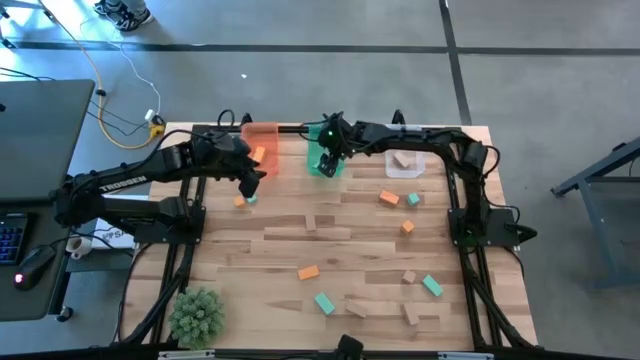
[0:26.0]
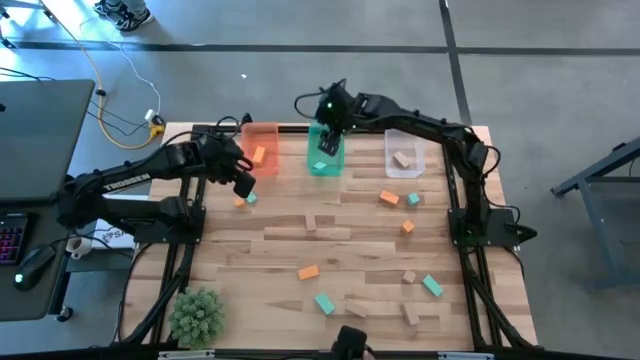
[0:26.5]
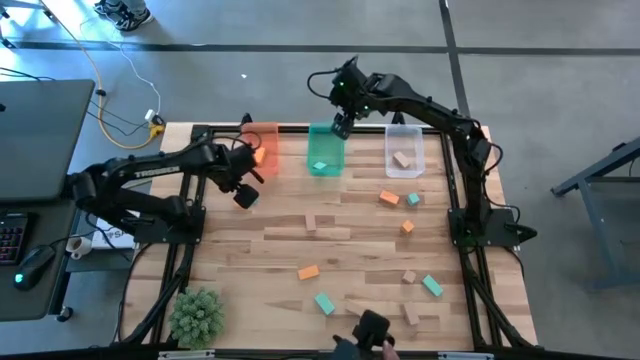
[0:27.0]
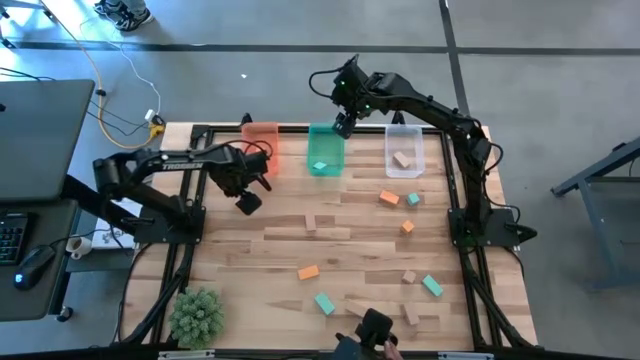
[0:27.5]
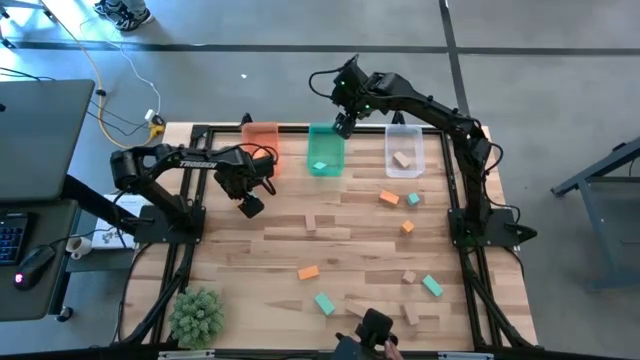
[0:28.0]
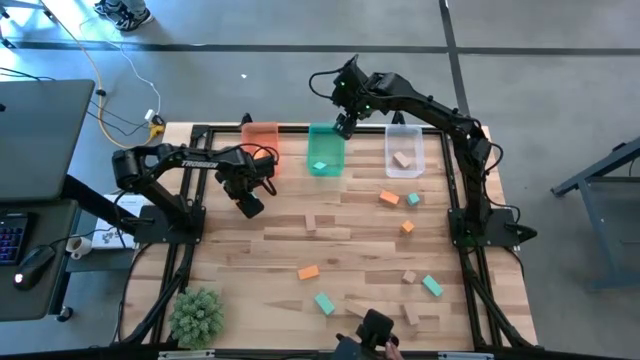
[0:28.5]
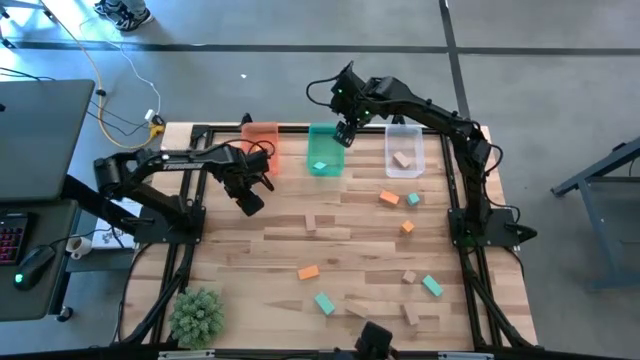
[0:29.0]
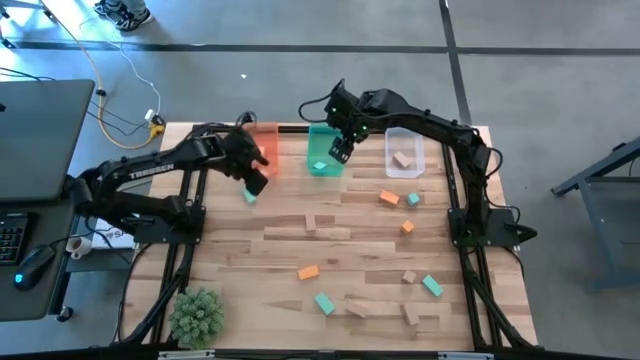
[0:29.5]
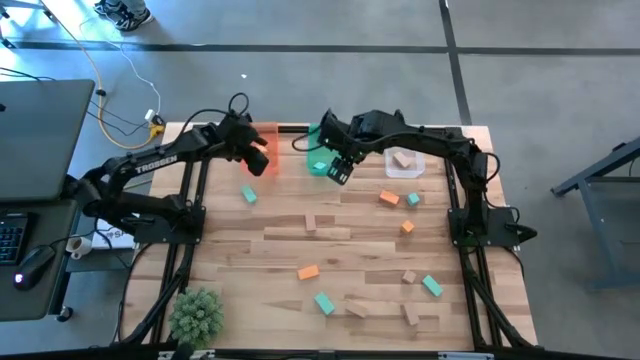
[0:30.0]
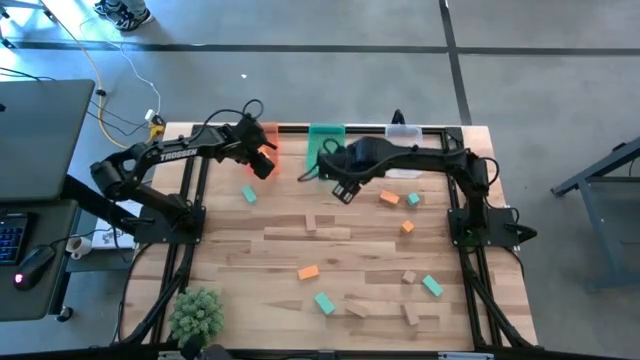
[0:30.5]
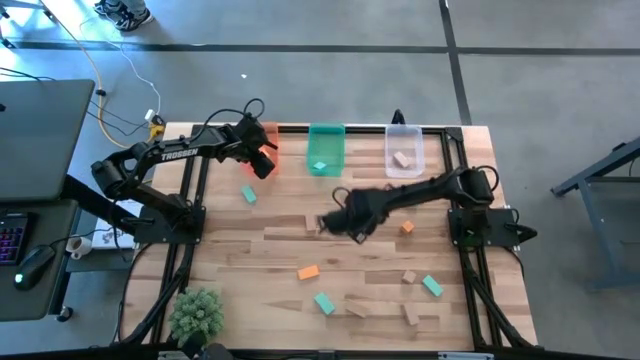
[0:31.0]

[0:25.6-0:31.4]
Task: Sort & place blocks by color
Put the orange block into the orange bin

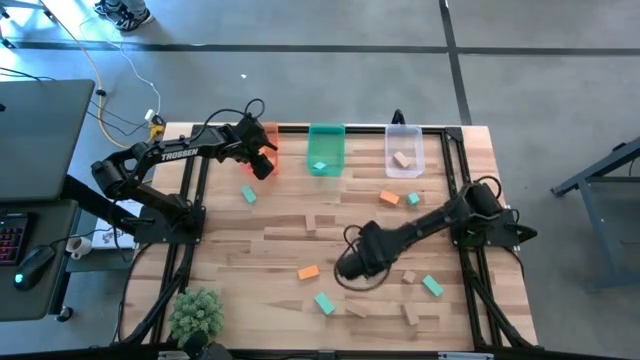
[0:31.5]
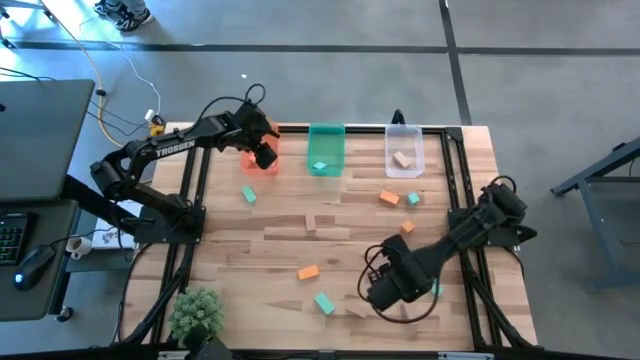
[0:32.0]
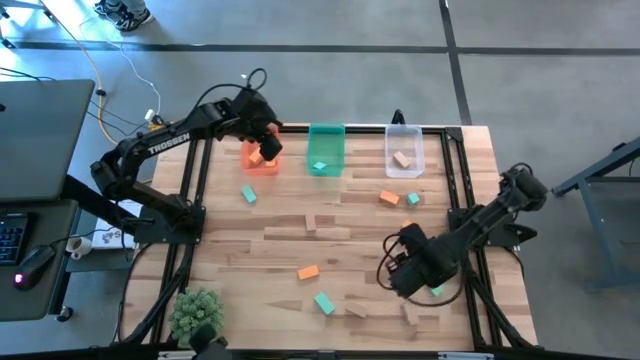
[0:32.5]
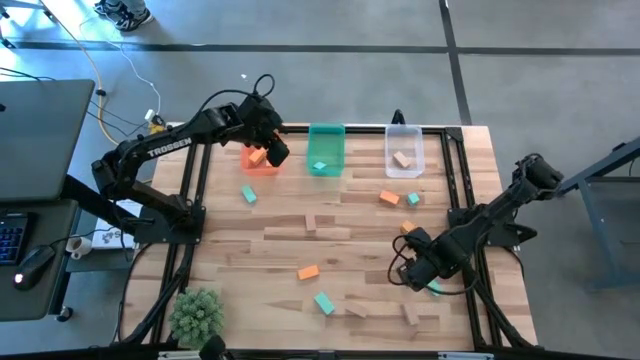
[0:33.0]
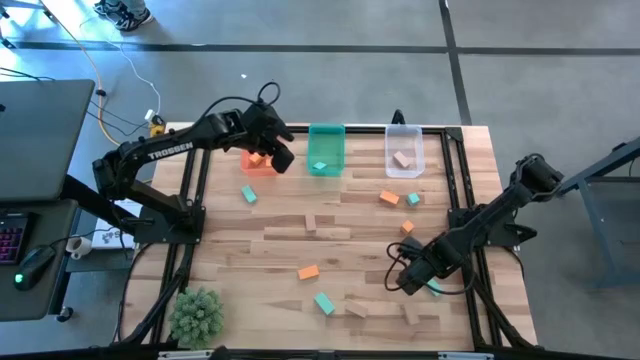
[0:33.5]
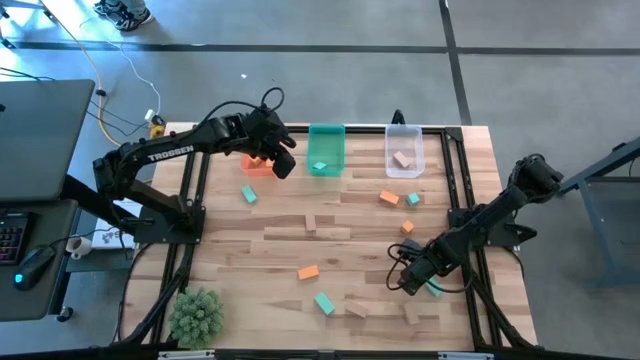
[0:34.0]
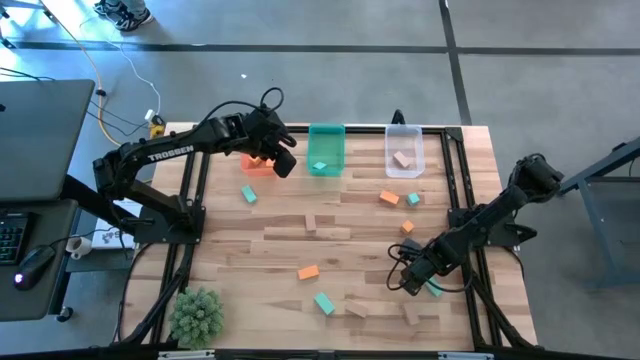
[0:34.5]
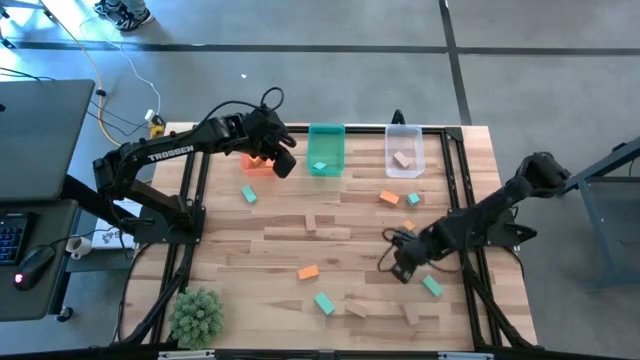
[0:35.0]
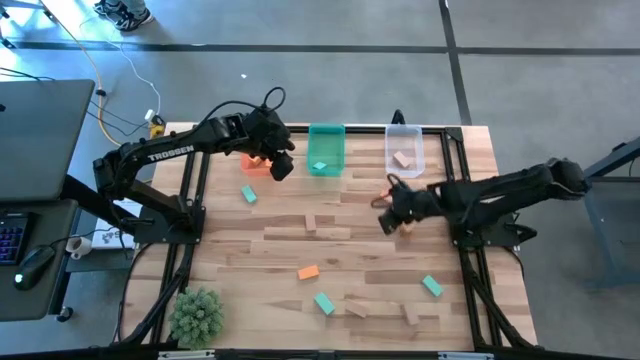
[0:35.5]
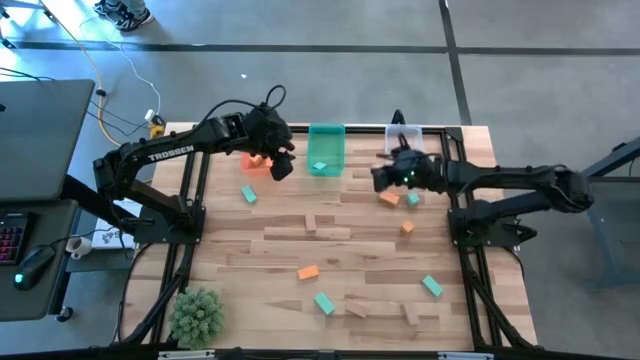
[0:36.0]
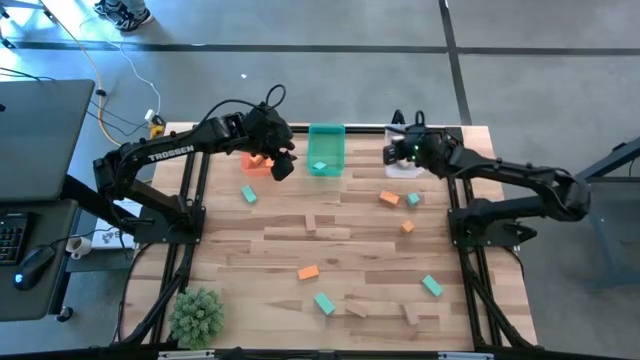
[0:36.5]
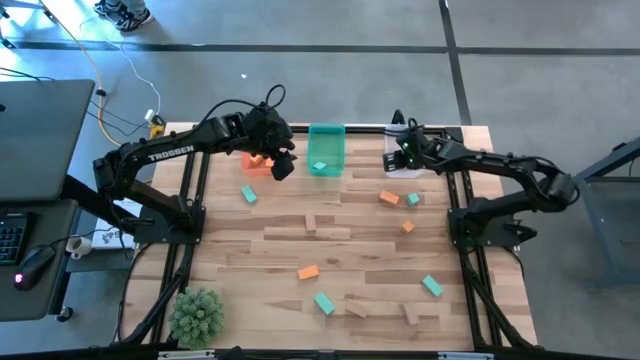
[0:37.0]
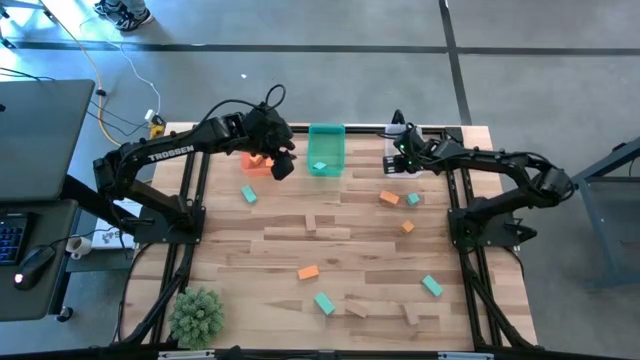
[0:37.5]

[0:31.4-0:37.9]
Put the brown block into the white bin

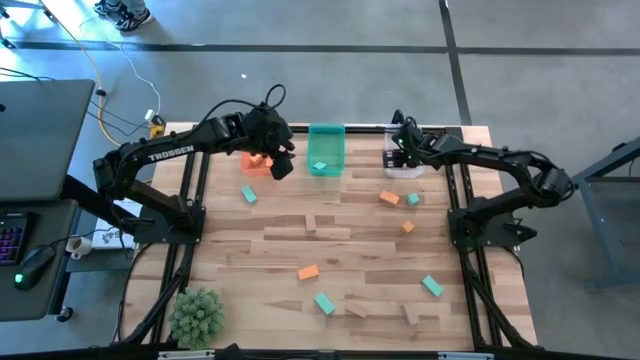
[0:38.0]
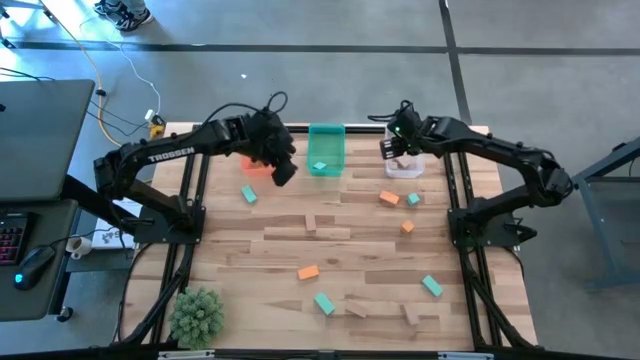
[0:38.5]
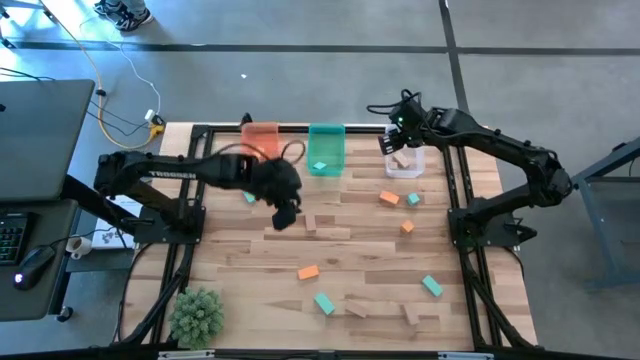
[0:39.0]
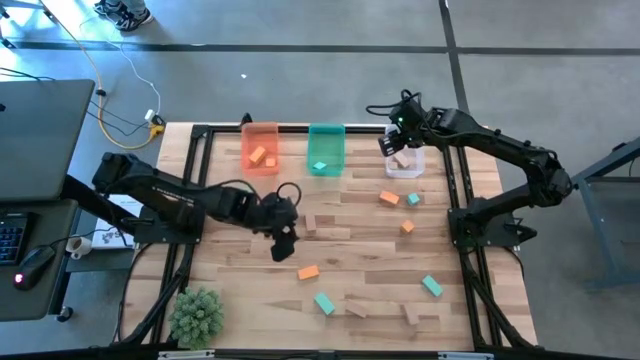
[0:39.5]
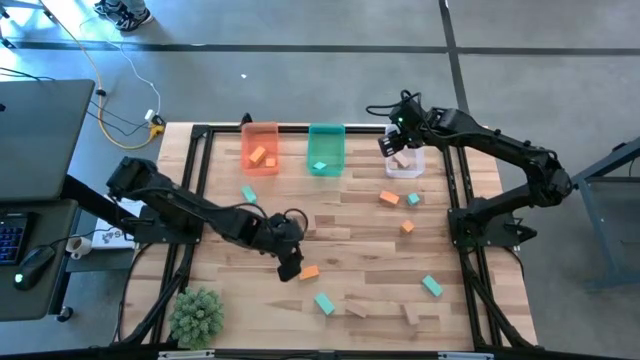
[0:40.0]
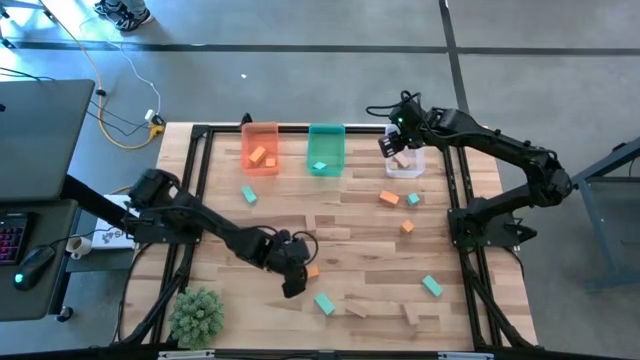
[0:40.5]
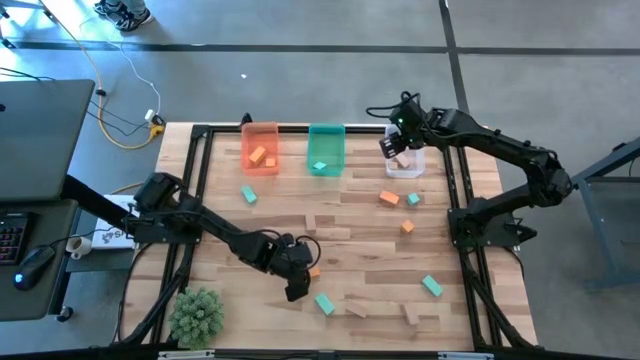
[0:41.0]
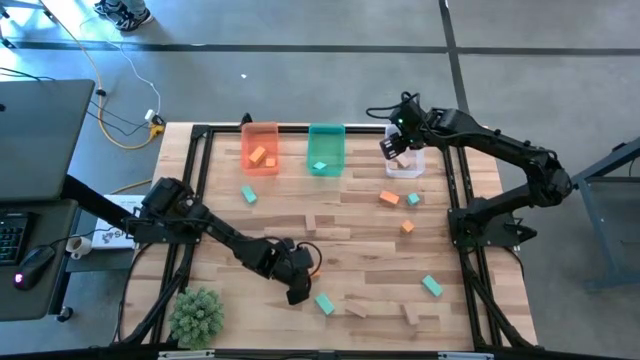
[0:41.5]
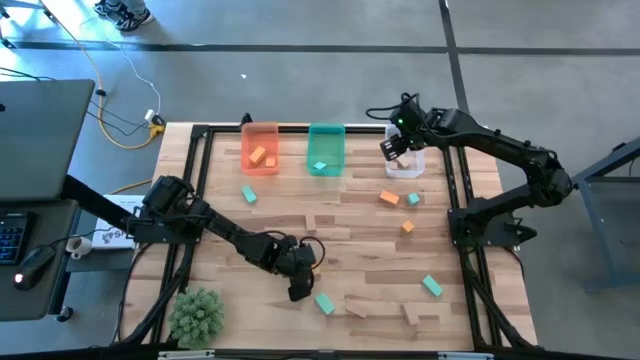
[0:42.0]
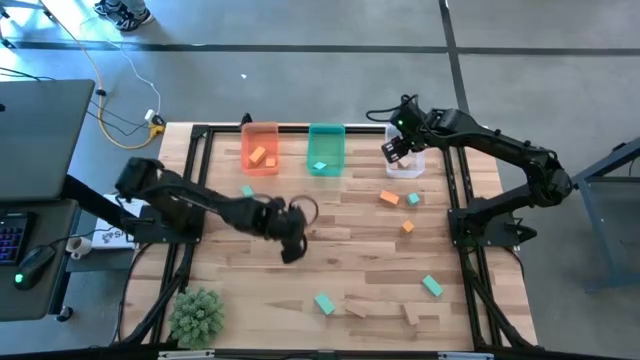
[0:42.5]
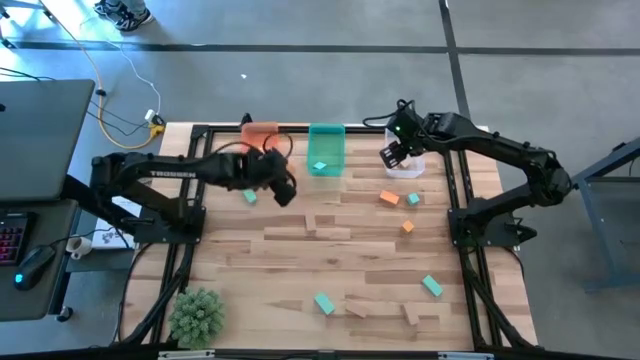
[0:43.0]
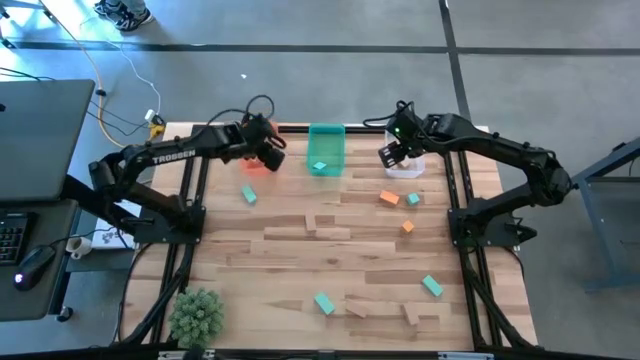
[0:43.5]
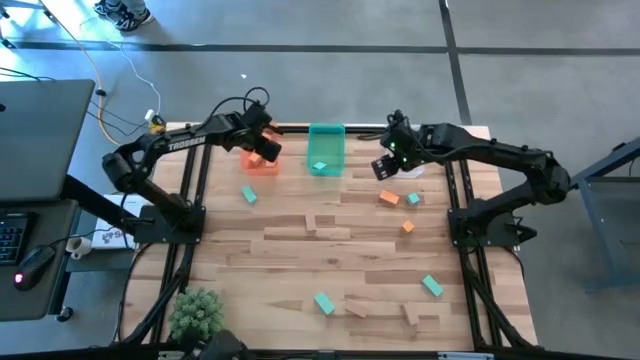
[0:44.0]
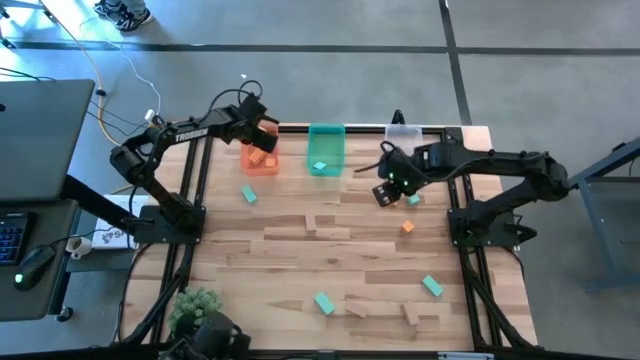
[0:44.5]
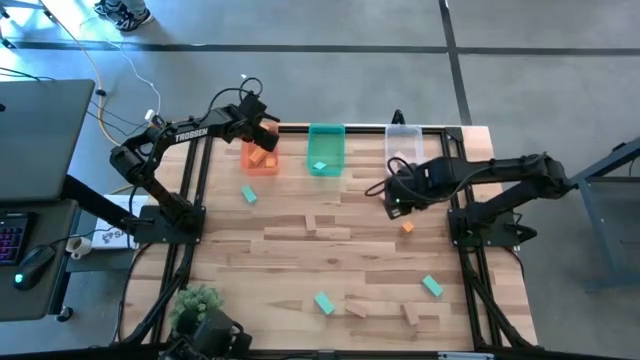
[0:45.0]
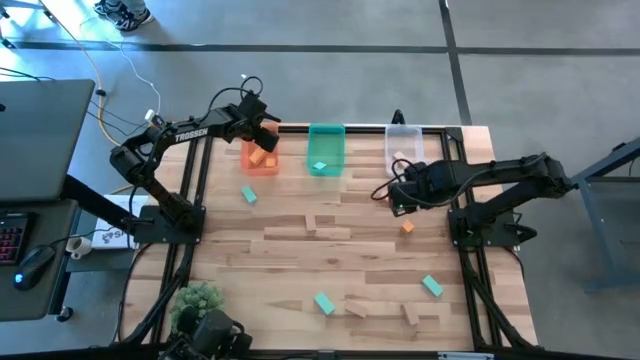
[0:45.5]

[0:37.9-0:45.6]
Put the orange block into the orange bin
